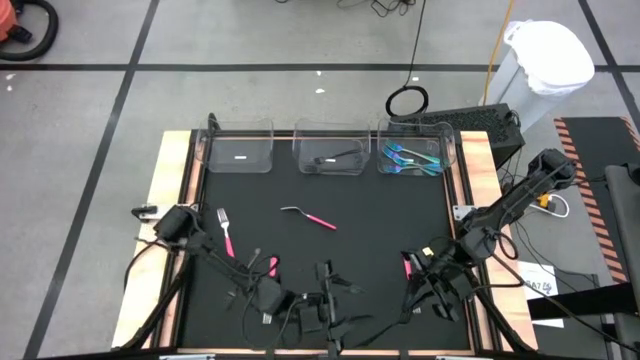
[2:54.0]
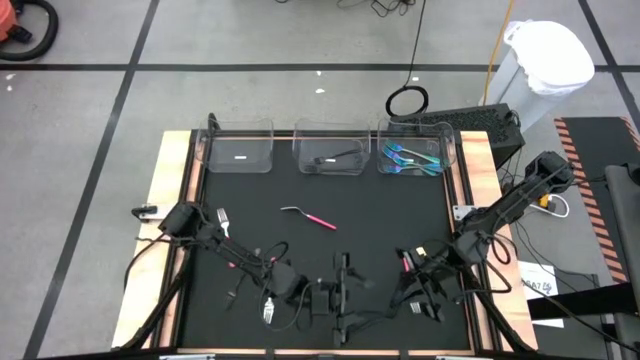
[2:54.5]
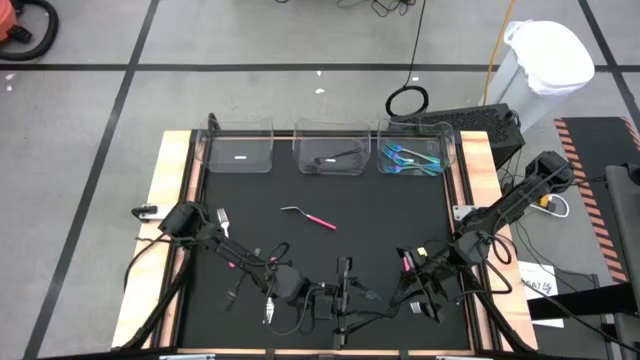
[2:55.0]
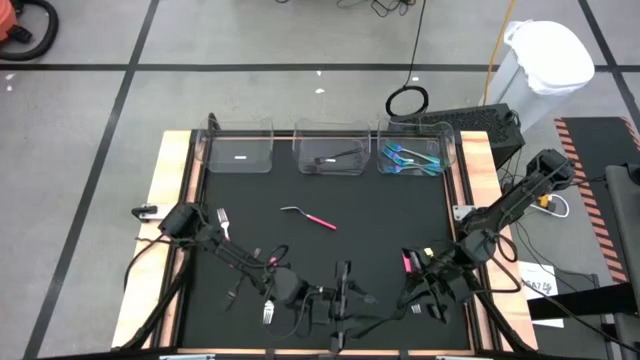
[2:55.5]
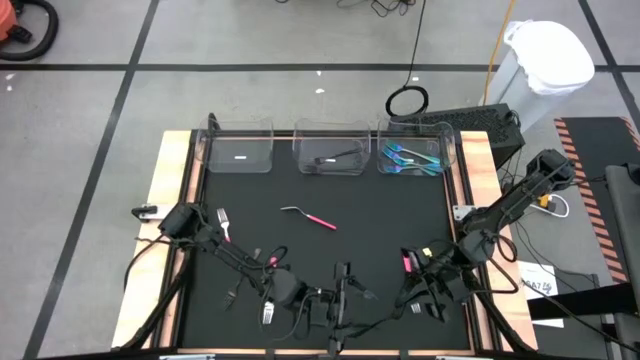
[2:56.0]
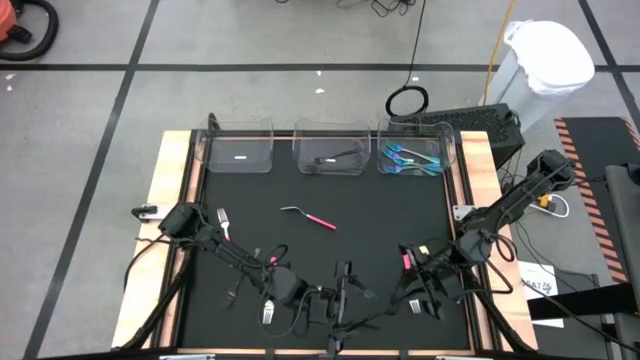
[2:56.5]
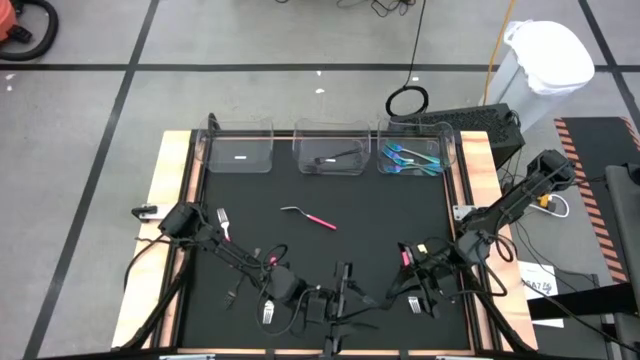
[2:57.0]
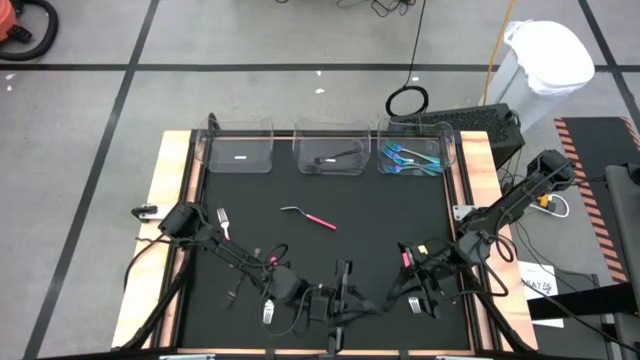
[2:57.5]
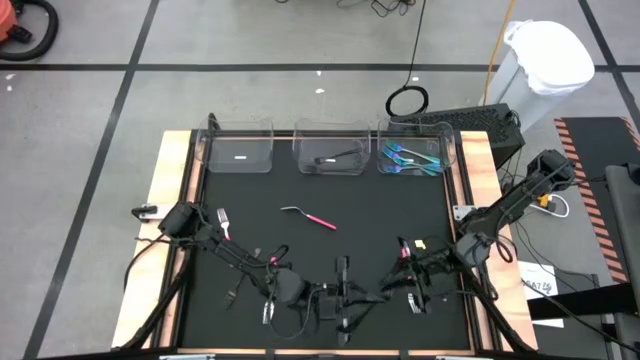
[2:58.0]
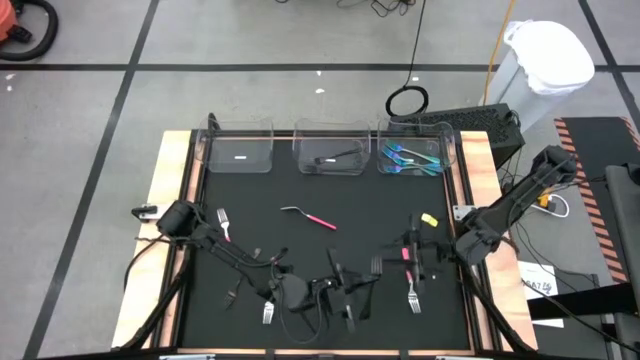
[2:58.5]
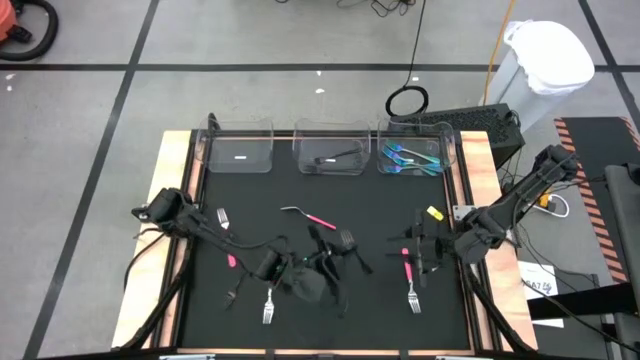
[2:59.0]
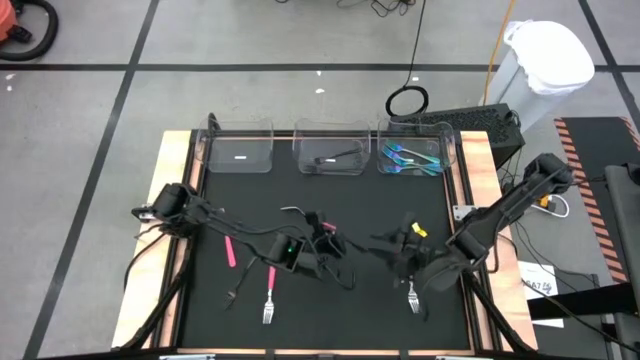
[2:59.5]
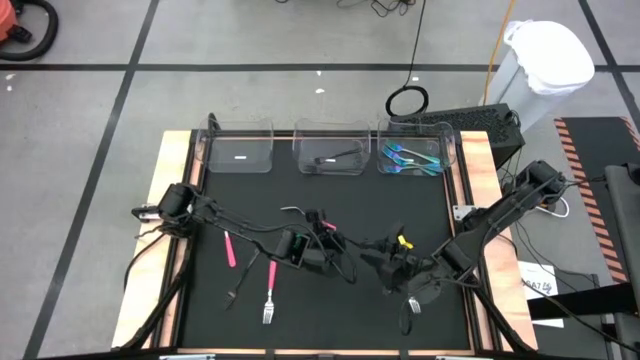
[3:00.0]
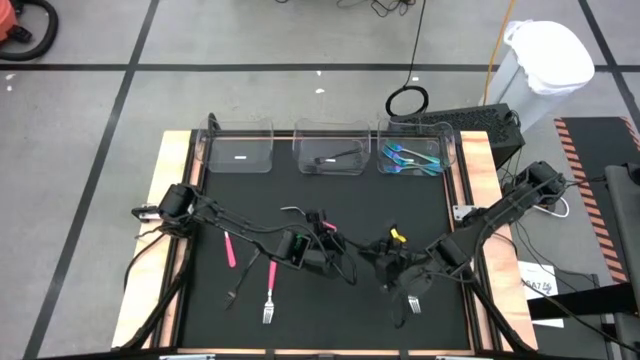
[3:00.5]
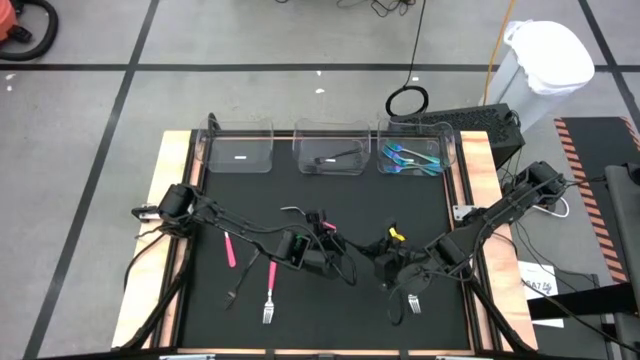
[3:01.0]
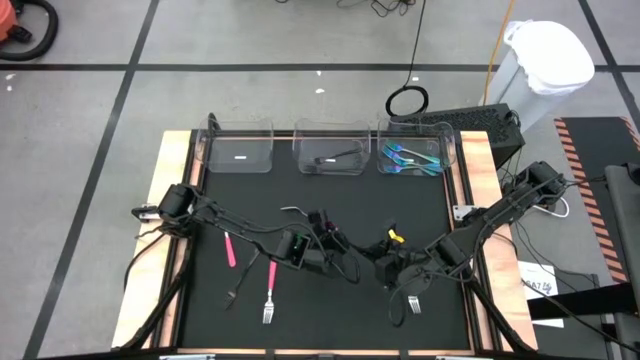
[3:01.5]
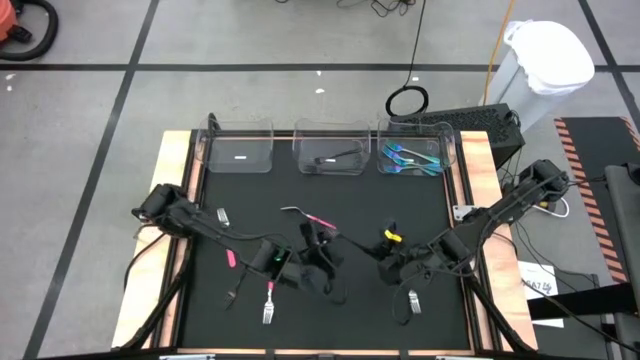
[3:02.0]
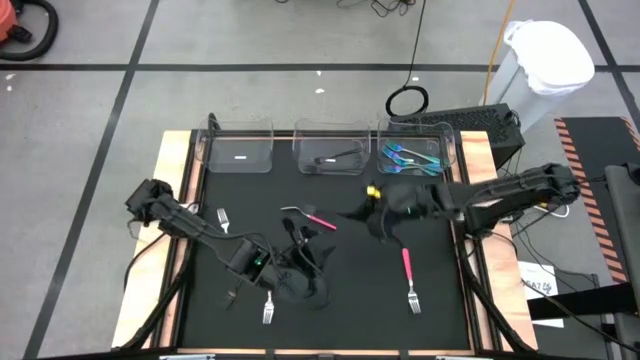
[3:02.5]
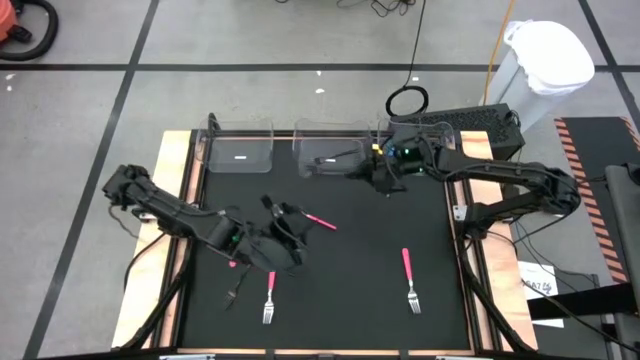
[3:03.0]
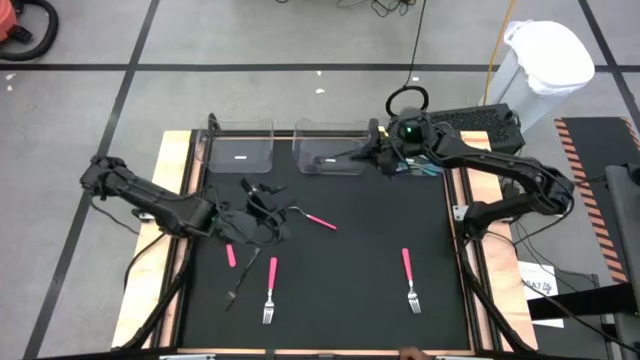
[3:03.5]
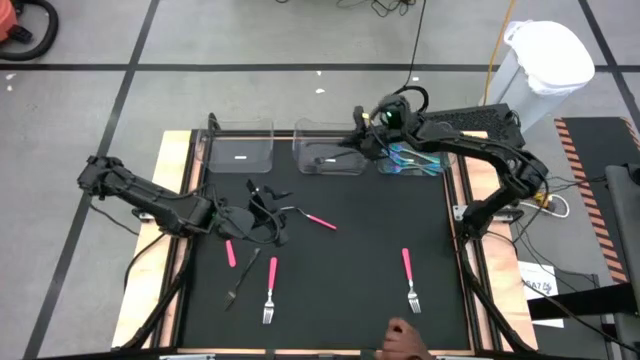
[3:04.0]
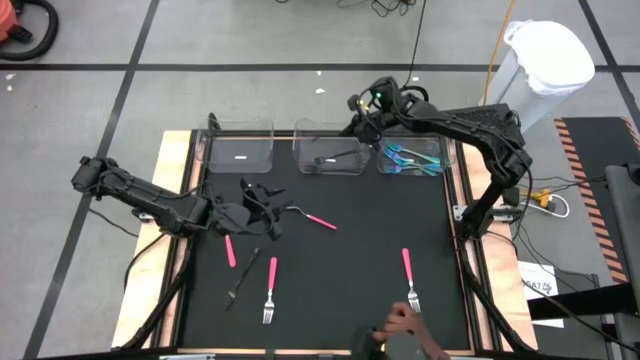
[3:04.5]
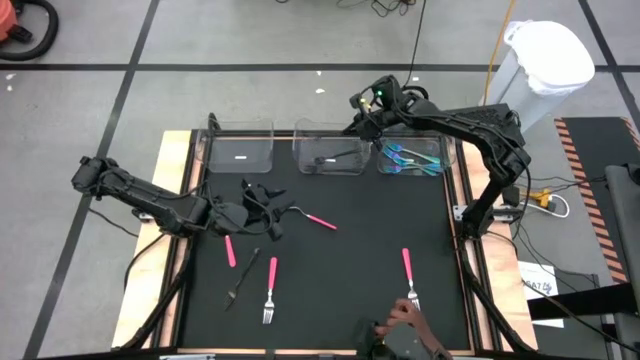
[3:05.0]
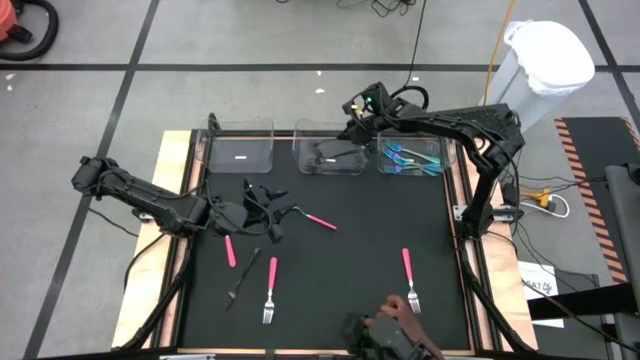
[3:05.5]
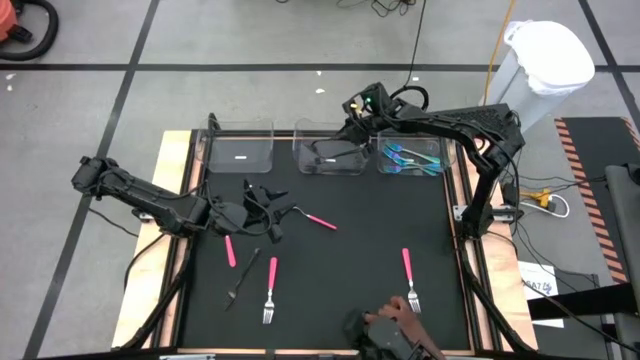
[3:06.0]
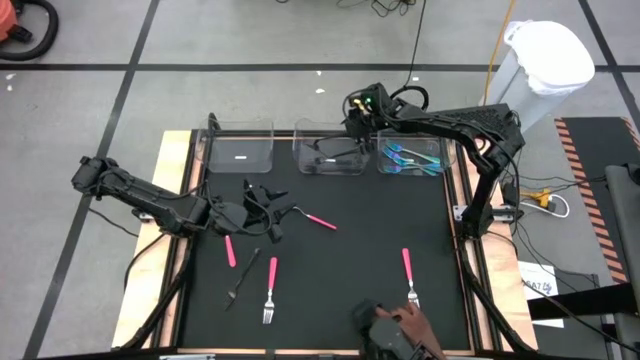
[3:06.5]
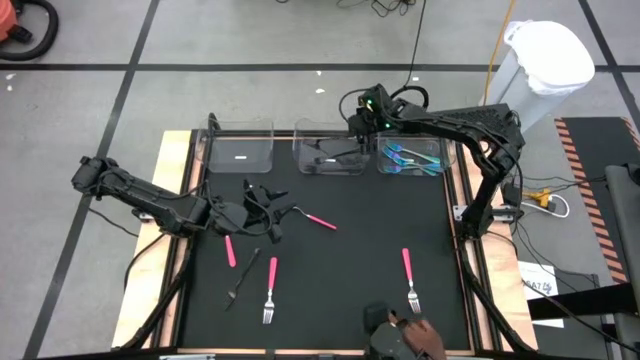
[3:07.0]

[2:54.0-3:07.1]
Task: Sort silverware by color (type)
Put the black fork into the middle transparent bin

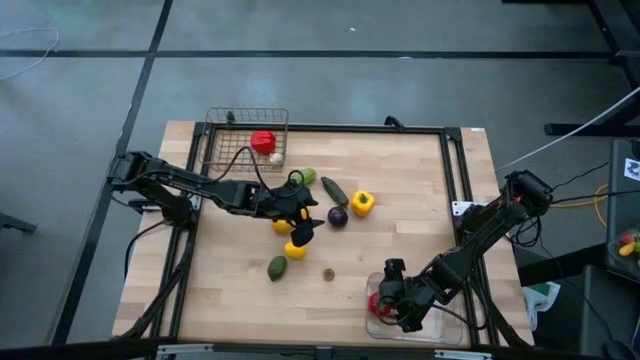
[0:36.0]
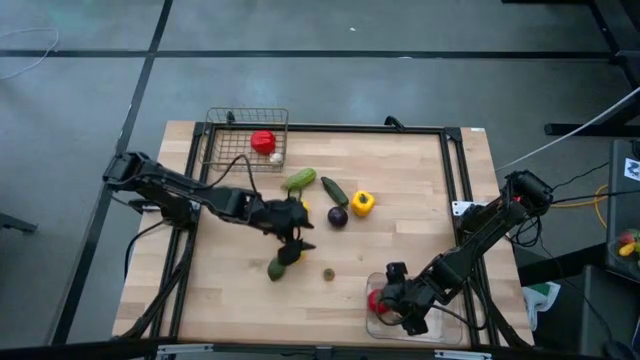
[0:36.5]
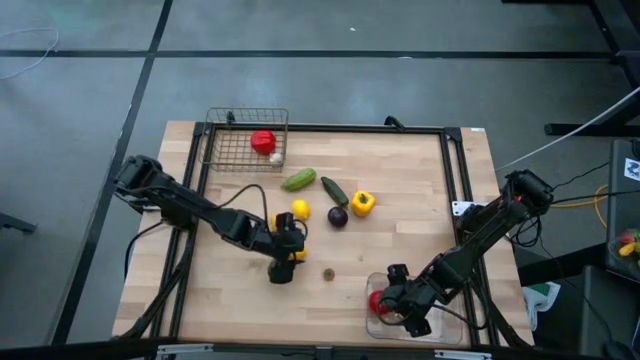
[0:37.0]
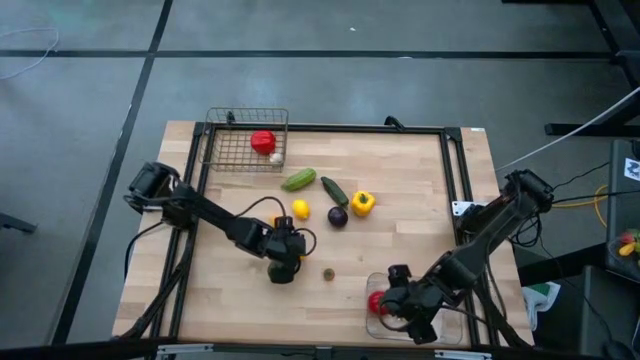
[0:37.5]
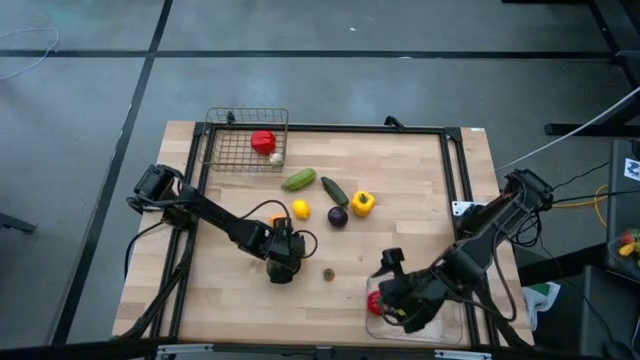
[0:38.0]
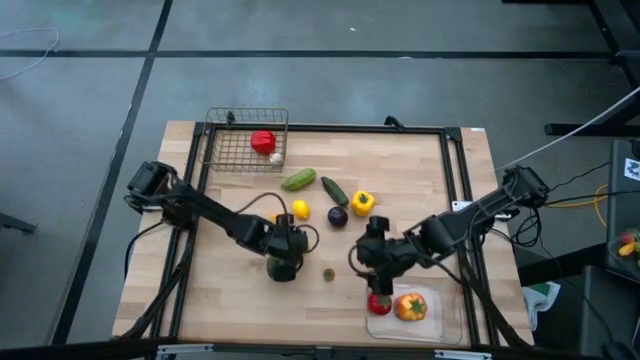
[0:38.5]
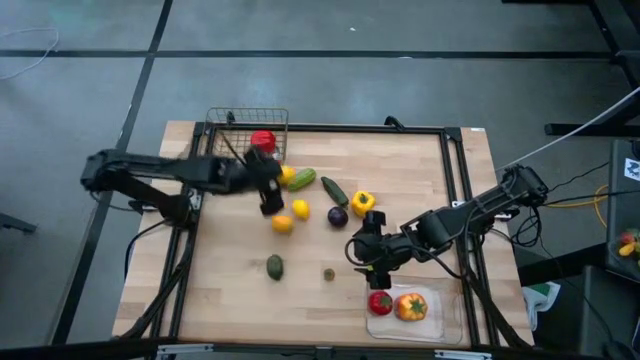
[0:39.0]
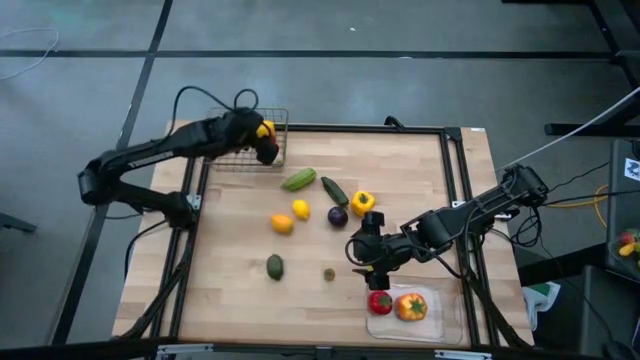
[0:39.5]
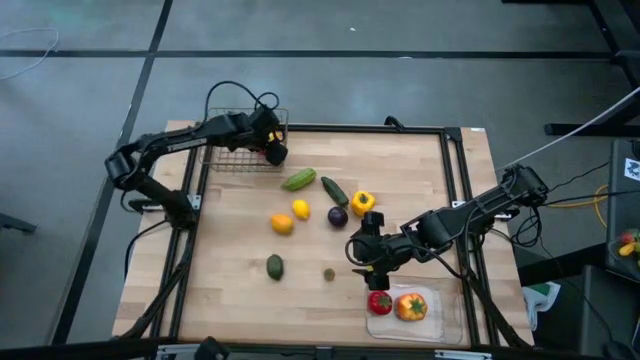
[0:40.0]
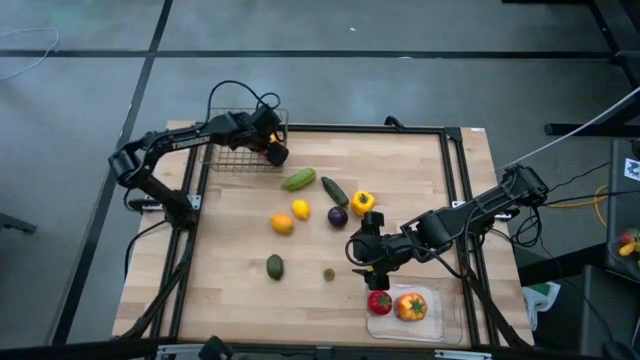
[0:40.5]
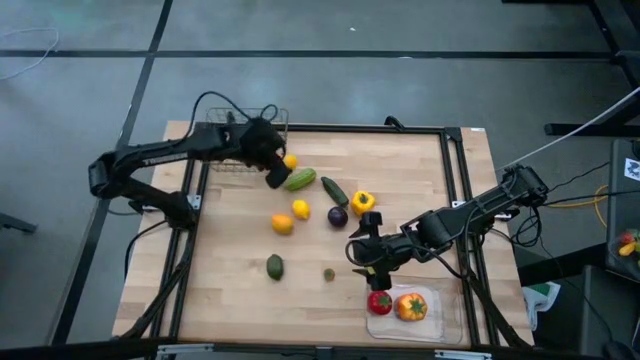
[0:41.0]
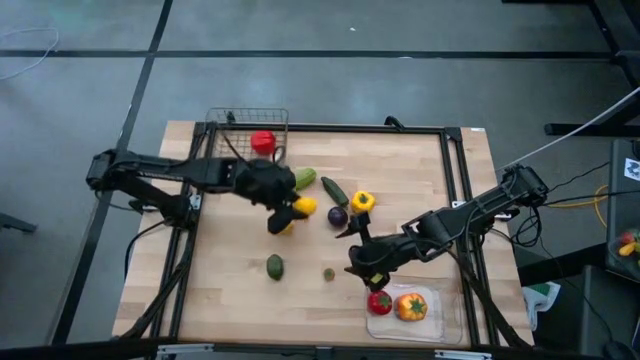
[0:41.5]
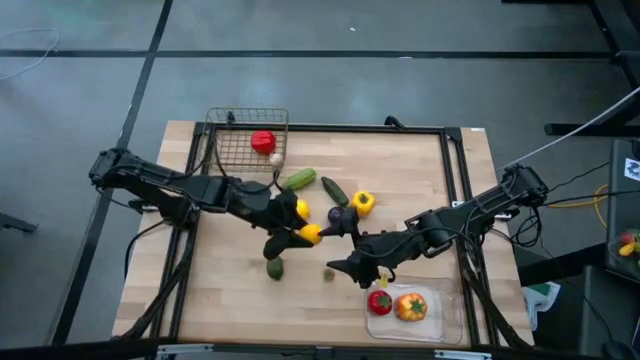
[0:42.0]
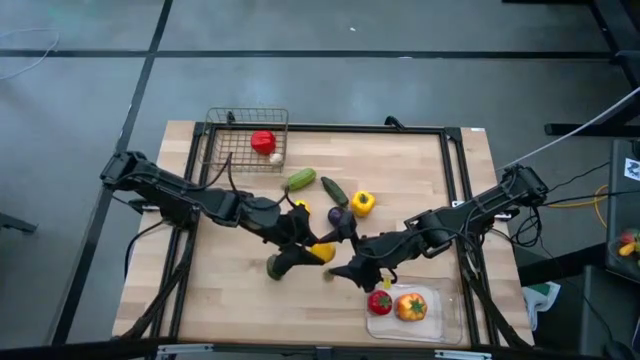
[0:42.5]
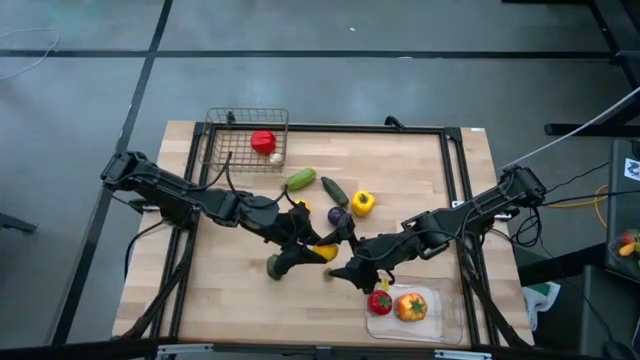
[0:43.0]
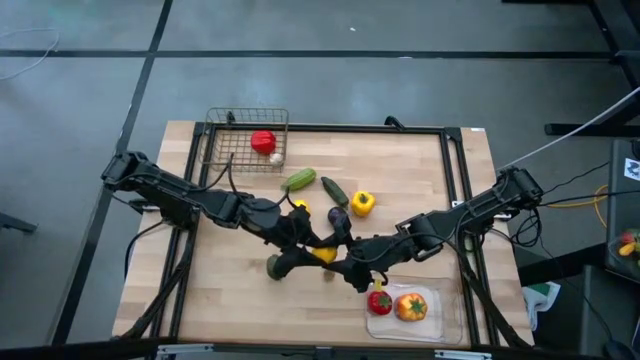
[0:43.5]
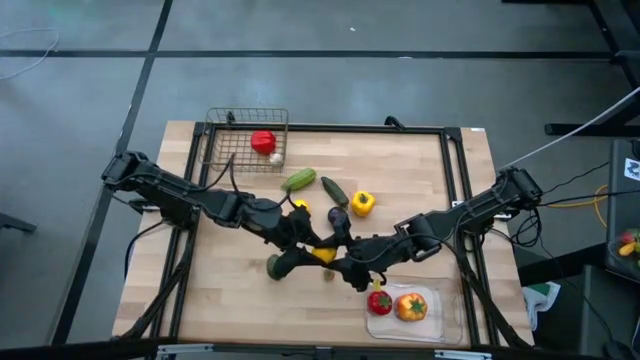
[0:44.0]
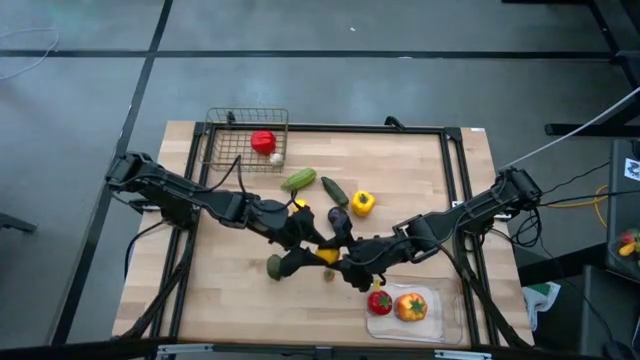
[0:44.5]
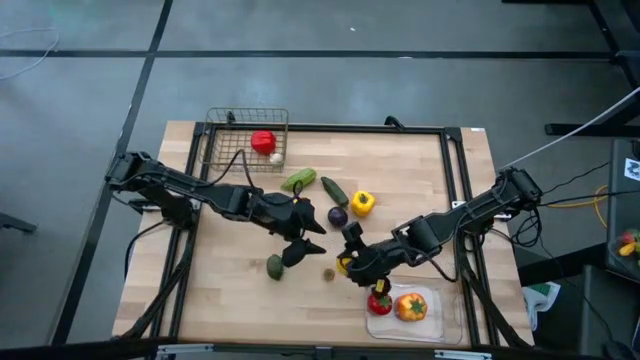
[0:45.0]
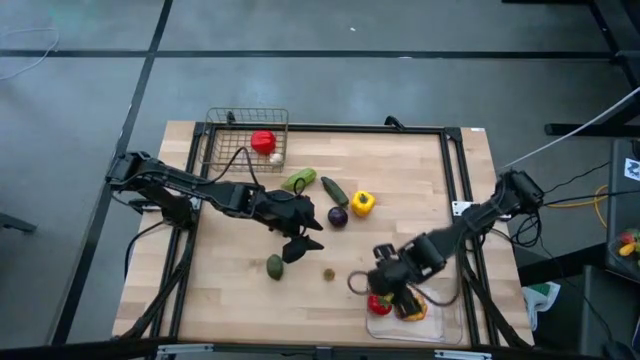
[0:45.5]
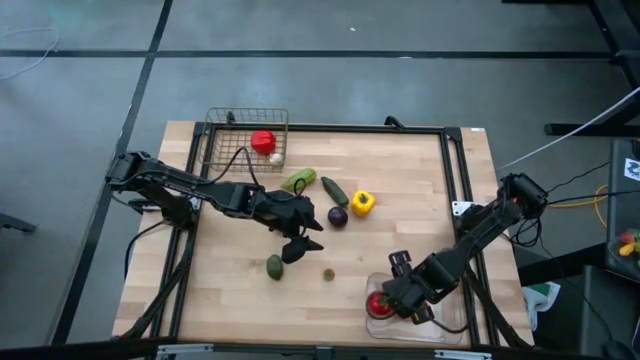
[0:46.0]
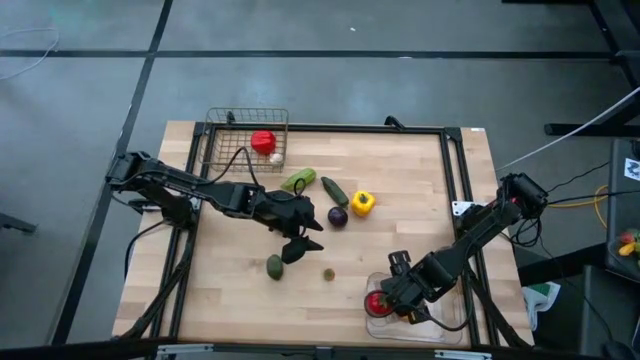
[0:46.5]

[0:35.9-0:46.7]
Task: Sort produce into baskets
Put the bottom lemon into the transparent bin
